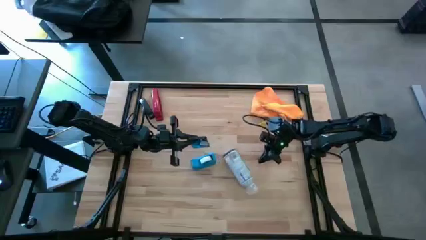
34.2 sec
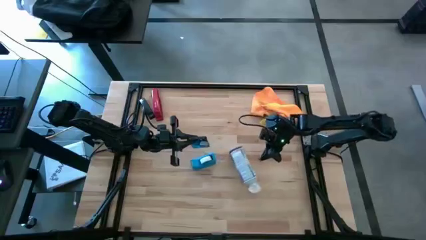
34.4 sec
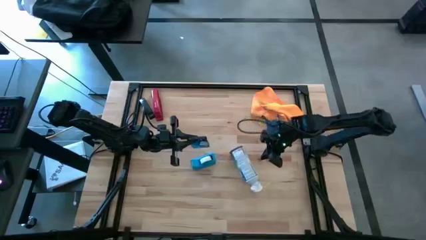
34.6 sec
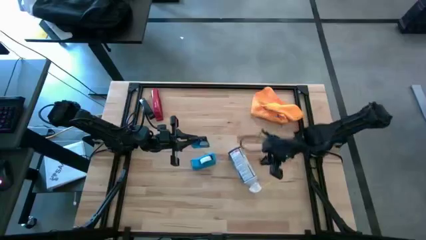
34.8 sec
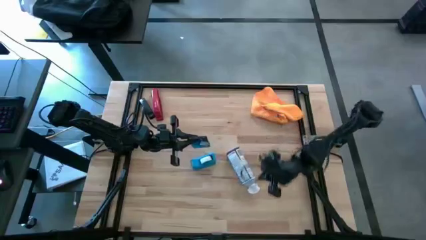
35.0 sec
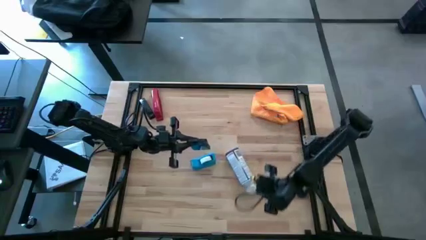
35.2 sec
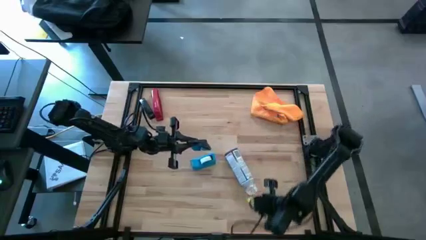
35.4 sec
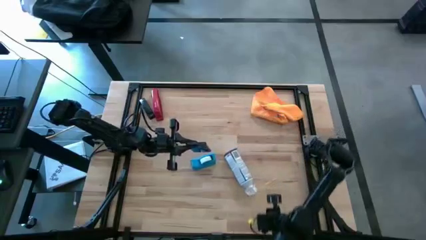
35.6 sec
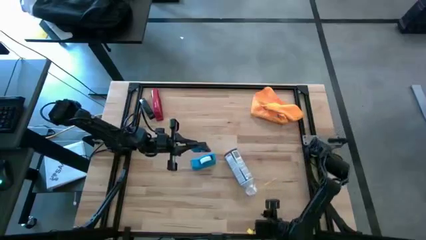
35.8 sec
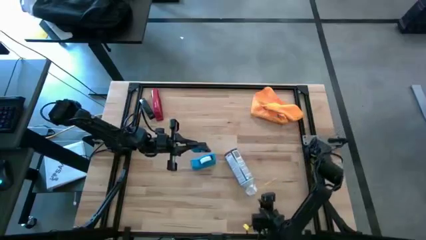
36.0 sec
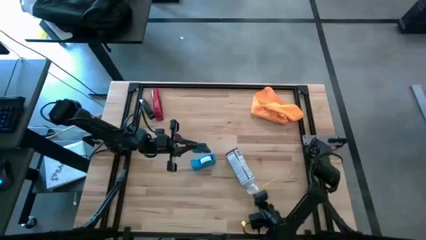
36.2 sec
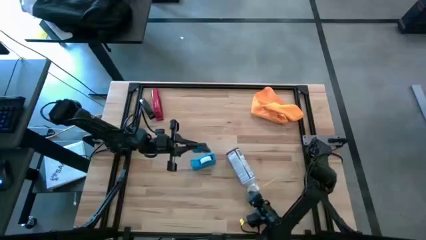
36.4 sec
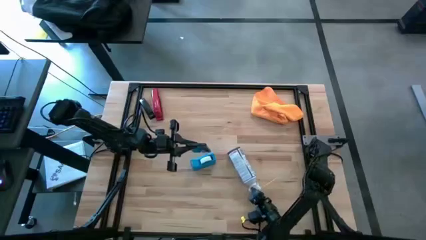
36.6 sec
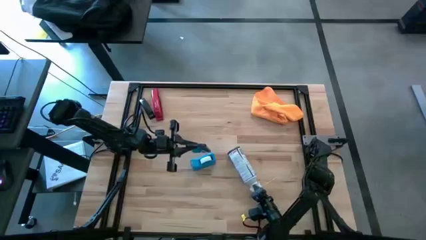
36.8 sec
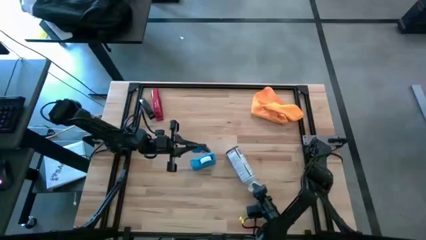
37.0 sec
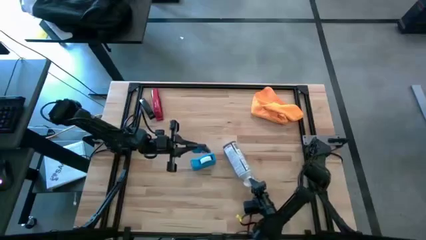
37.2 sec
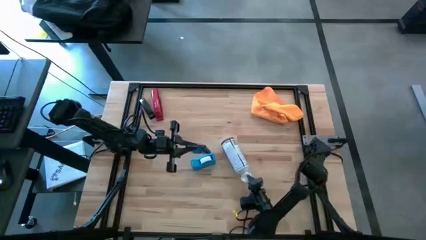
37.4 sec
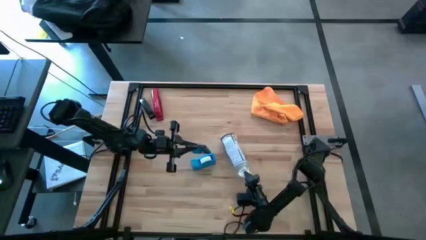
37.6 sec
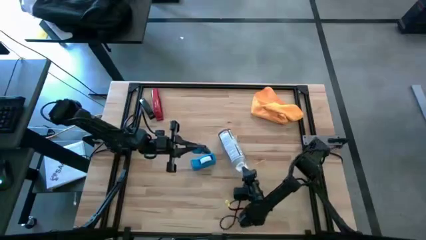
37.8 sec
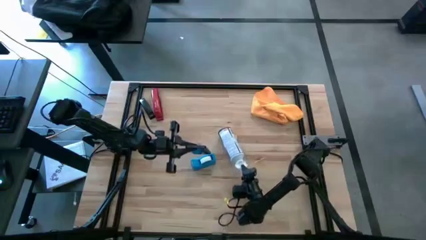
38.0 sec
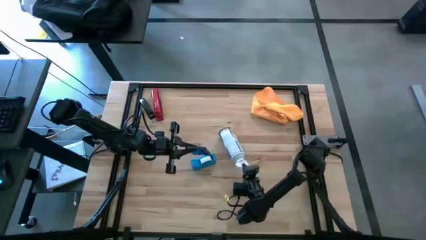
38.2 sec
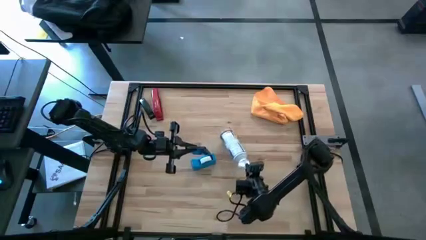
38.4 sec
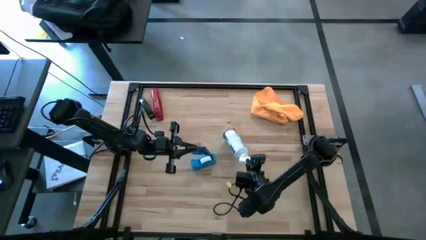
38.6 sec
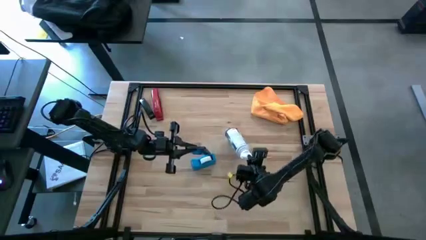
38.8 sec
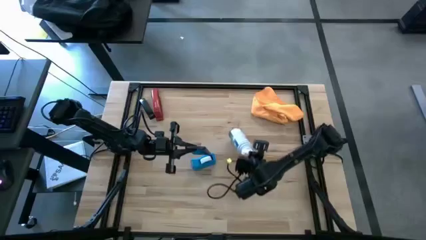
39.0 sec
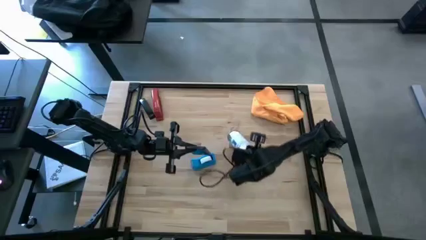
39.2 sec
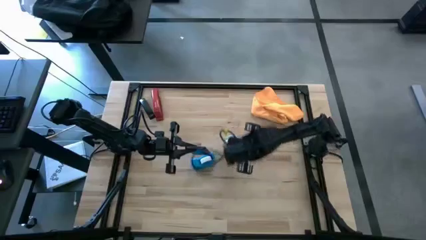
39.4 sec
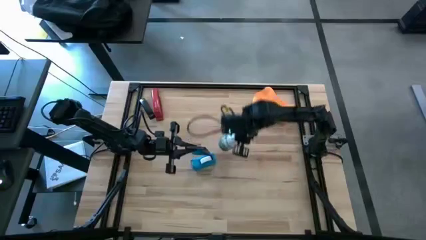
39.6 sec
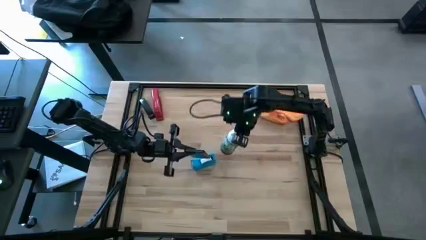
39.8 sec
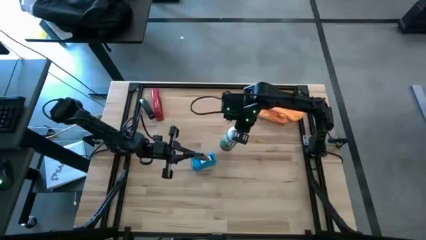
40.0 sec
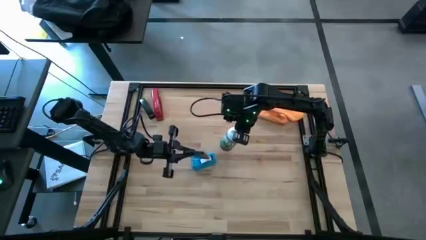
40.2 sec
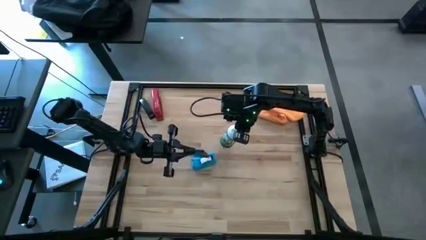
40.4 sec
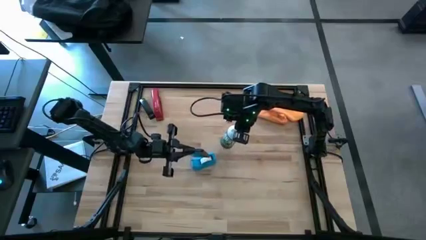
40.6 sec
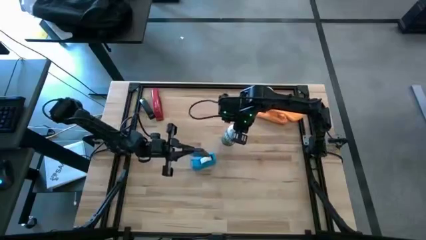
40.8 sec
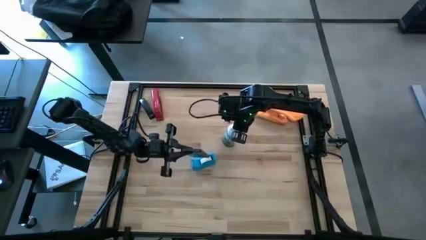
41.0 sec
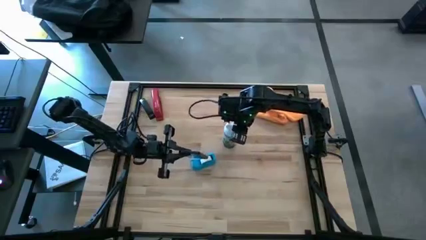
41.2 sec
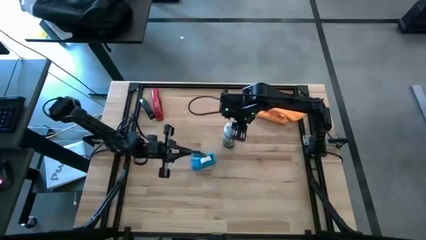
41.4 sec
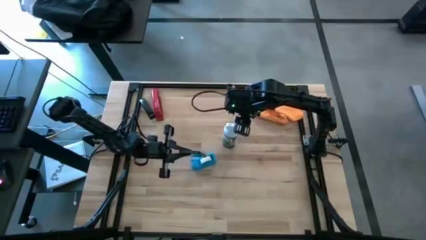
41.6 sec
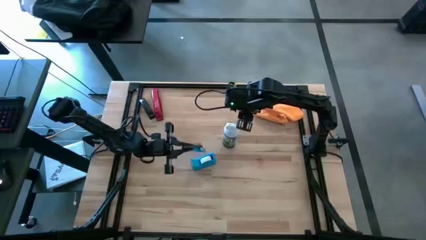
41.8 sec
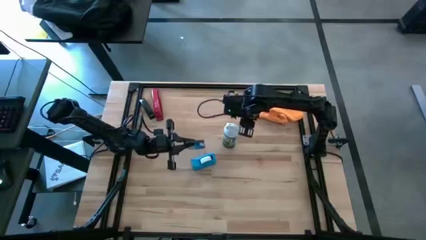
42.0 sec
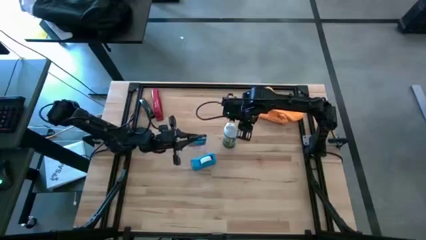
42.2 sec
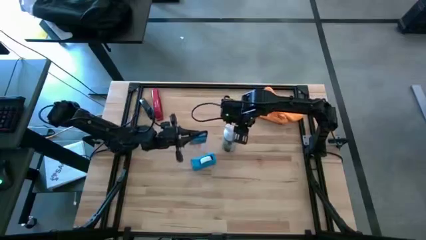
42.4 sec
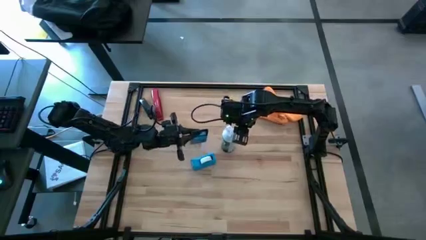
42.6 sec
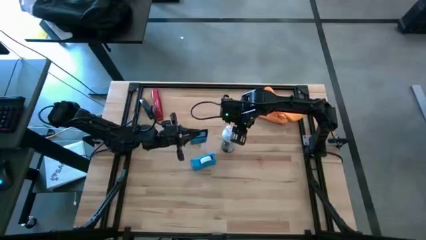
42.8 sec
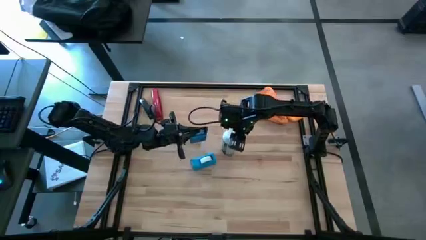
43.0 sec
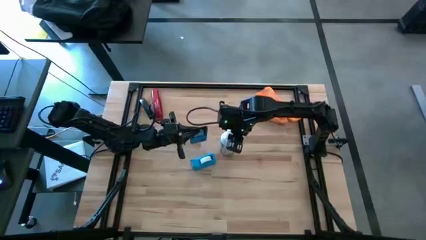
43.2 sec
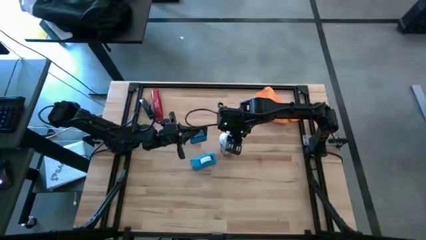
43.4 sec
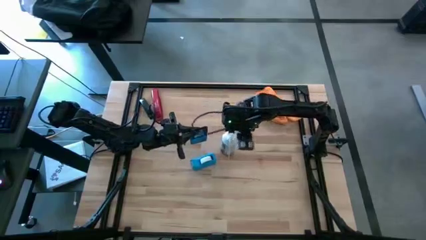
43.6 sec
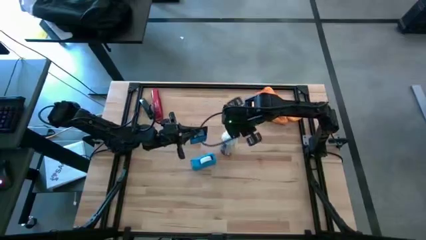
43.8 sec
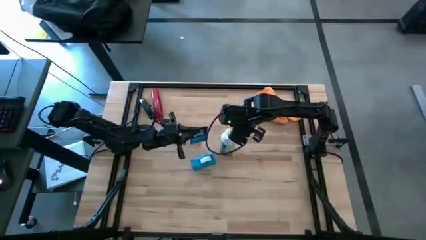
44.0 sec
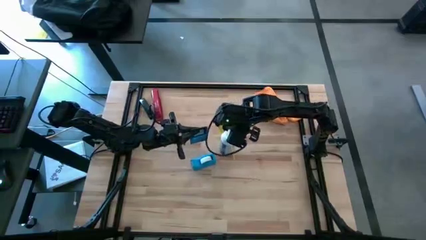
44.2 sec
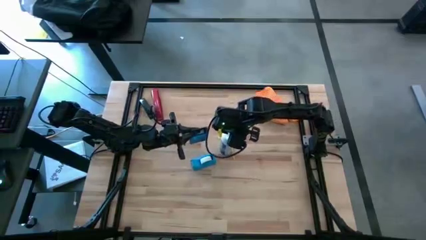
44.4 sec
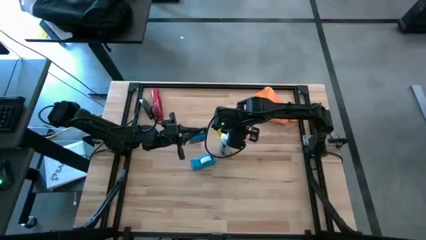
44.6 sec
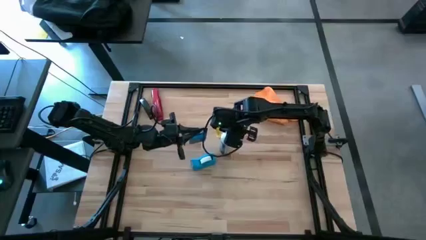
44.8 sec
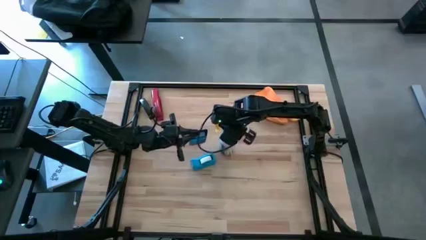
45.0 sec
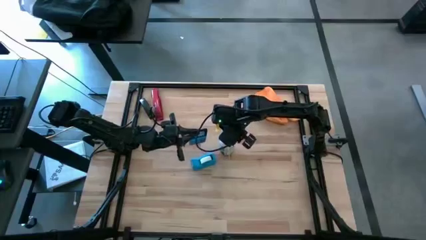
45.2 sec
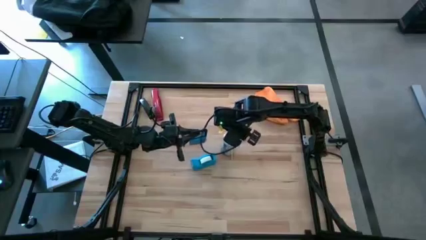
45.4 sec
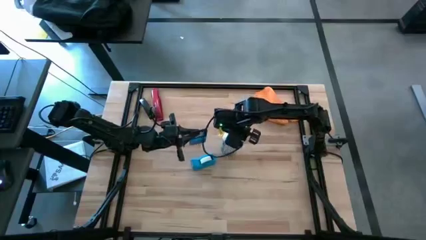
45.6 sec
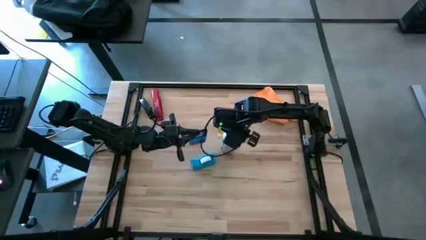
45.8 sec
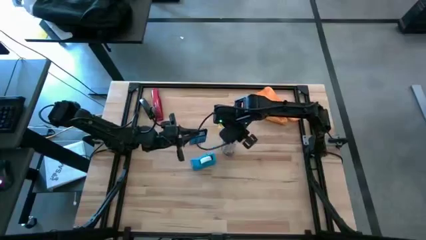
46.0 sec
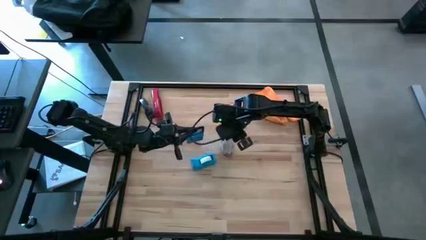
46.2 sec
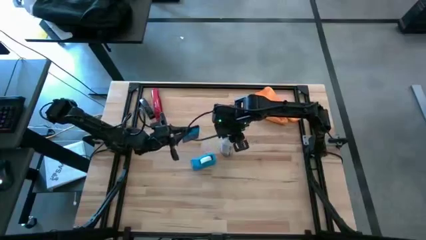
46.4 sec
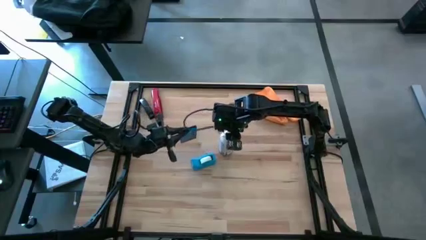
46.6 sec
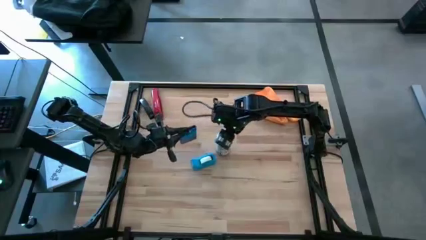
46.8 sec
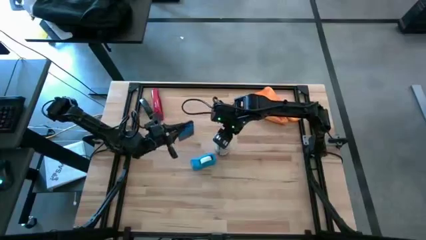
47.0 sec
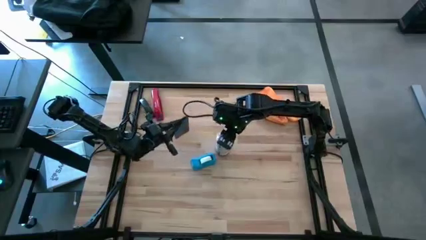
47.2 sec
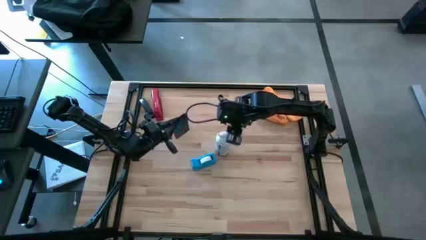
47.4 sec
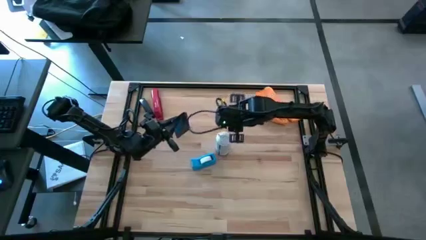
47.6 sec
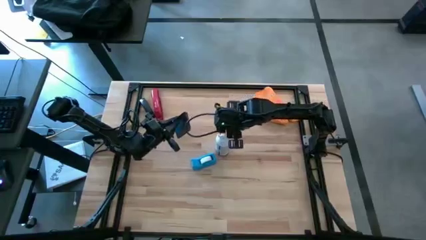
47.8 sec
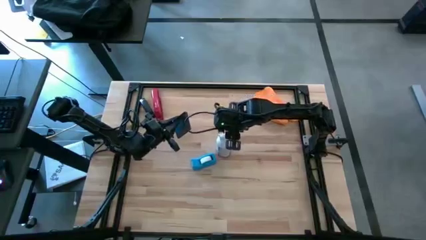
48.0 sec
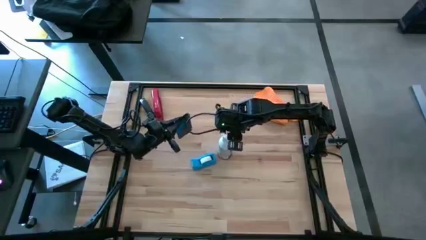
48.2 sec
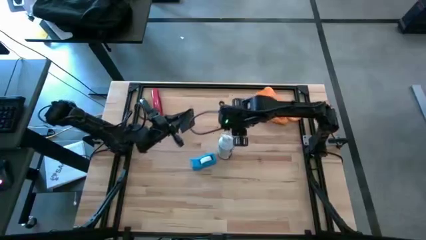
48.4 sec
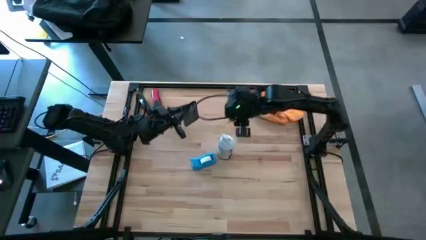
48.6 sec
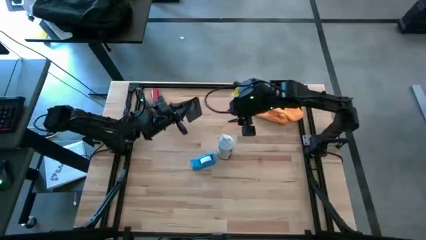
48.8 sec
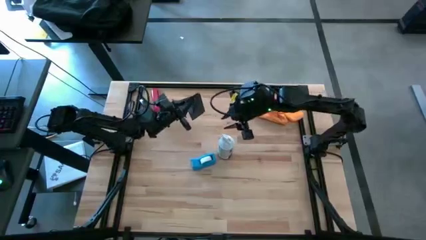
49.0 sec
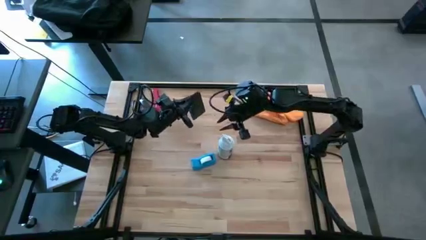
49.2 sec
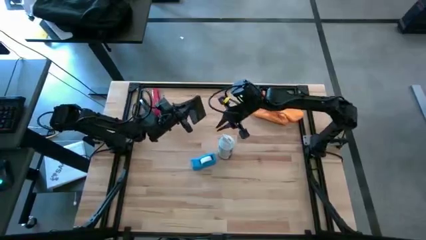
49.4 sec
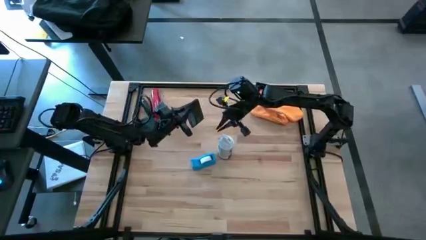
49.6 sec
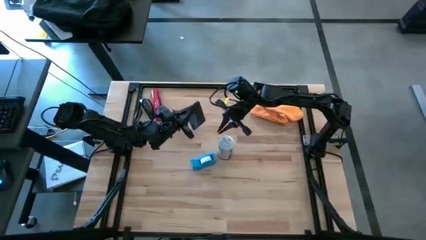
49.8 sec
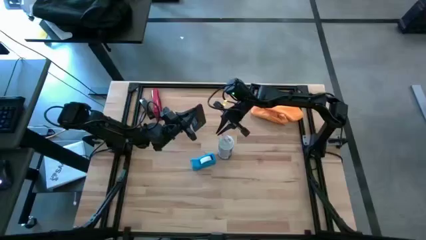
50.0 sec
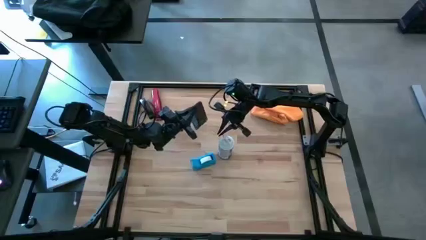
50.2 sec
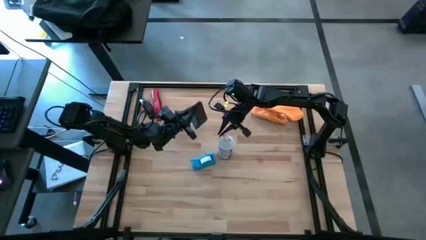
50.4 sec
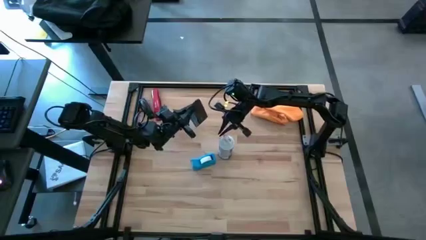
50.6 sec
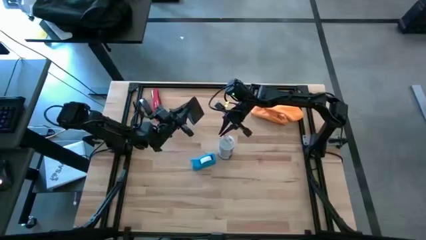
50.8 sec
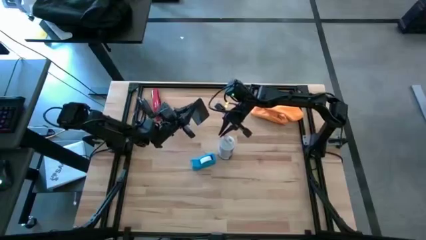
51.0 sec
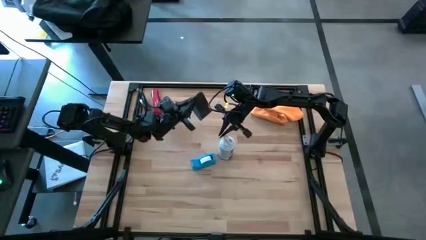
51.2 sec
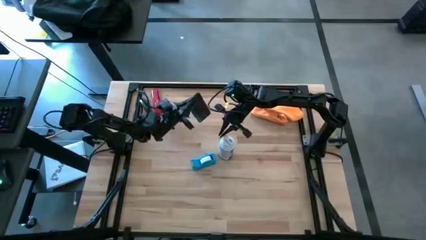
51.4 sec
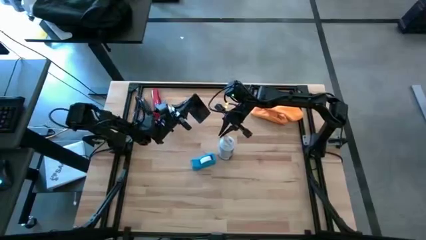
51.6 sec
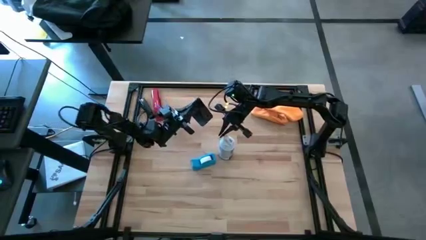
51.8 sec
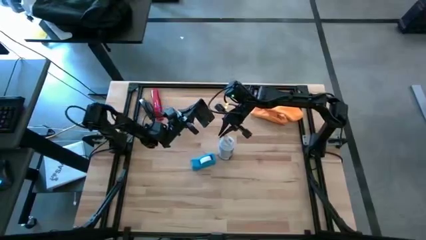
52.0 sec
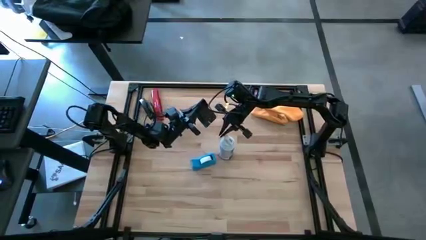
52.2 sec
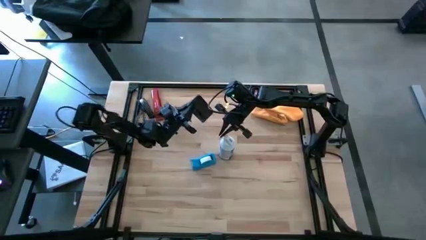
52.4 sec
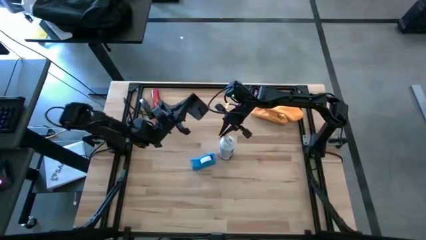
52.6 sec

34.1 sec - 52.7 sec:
Task: Apply microfiber cloth
Spray the back of the black cellphone using the white spray bottle
